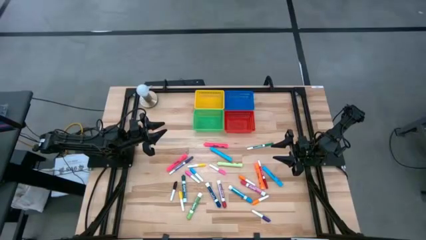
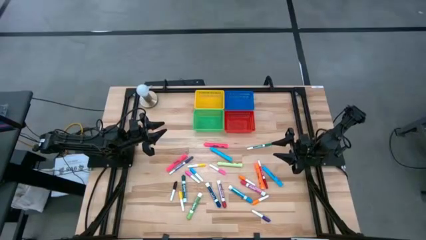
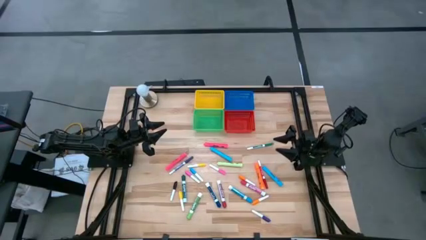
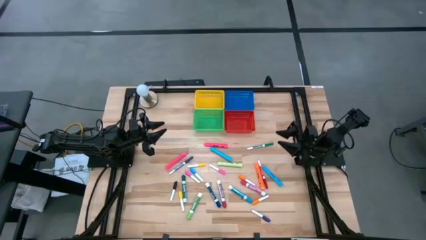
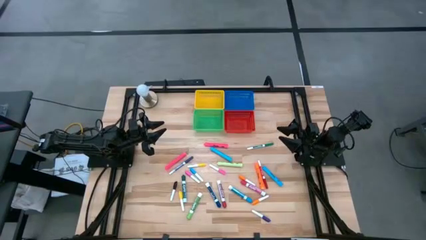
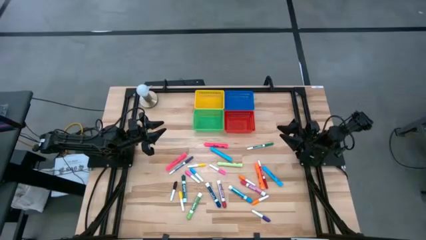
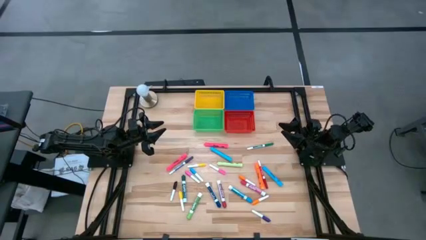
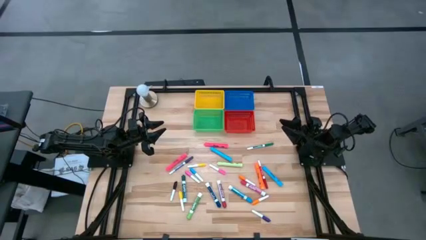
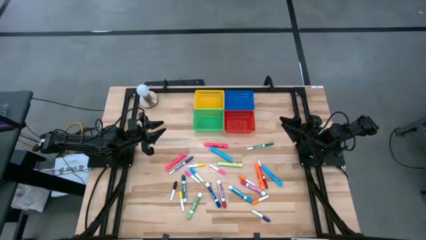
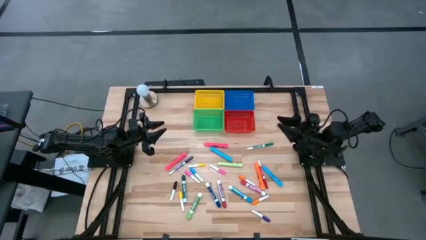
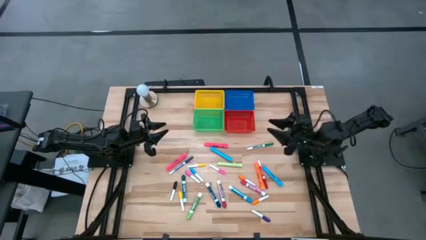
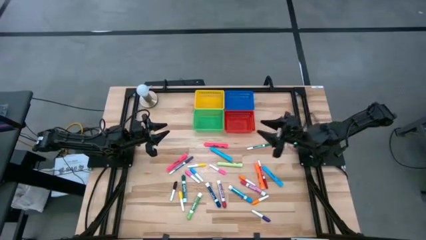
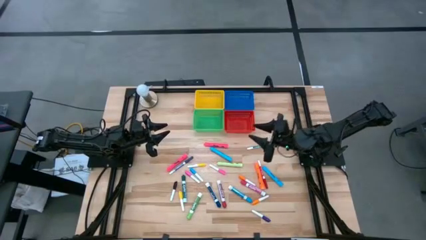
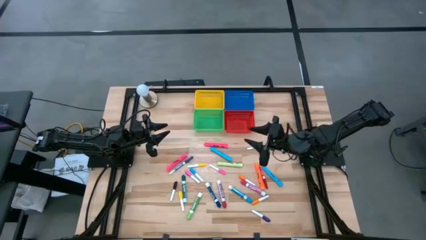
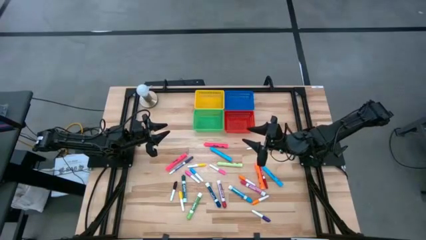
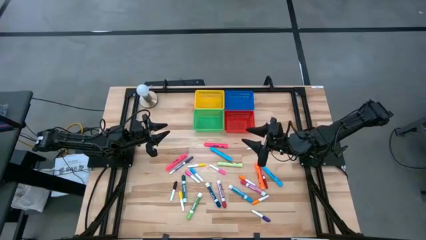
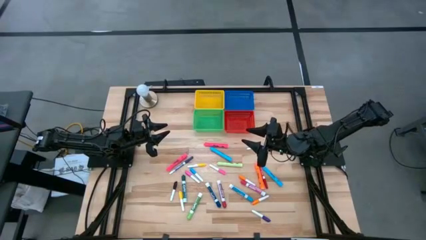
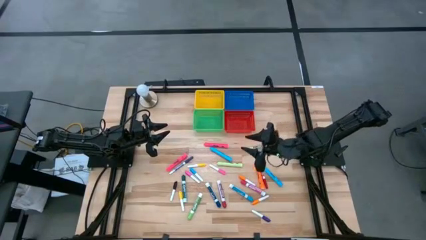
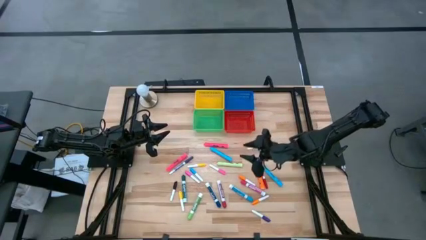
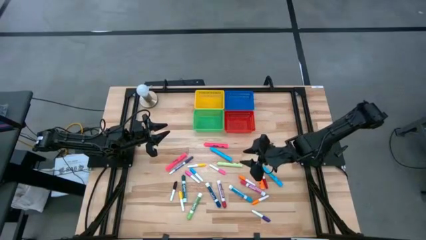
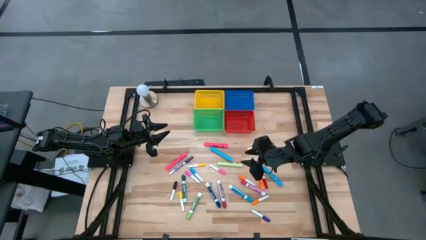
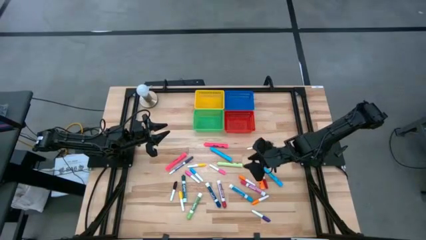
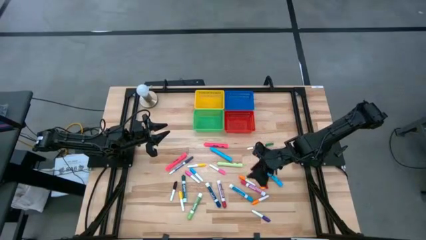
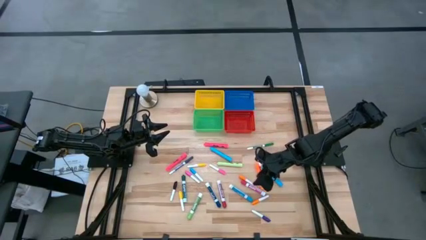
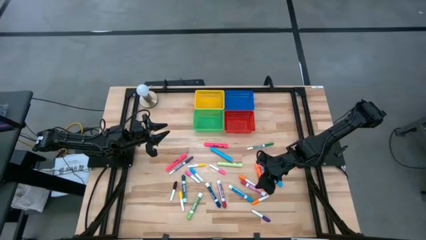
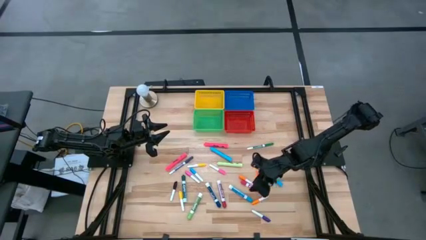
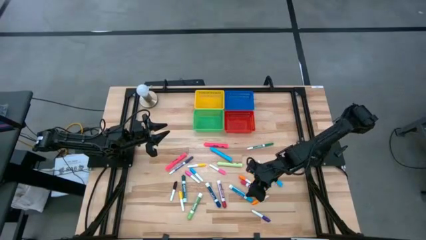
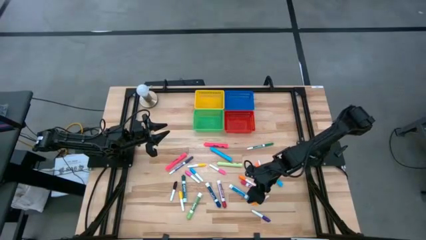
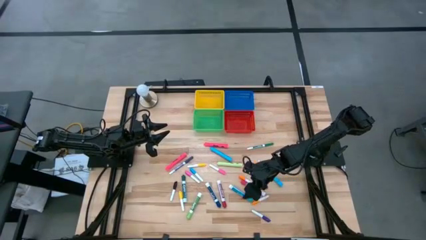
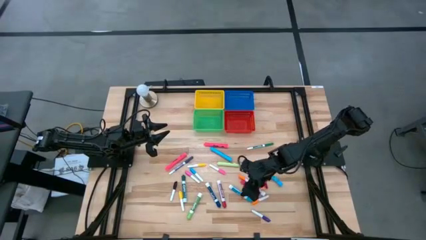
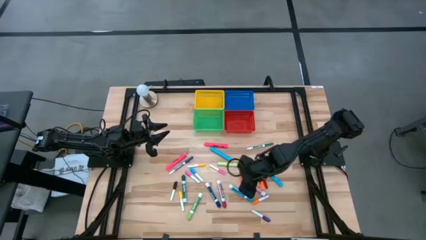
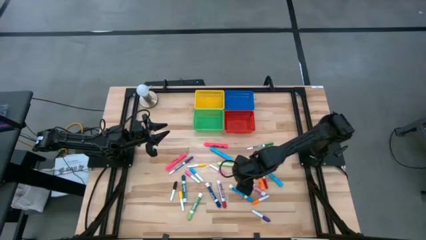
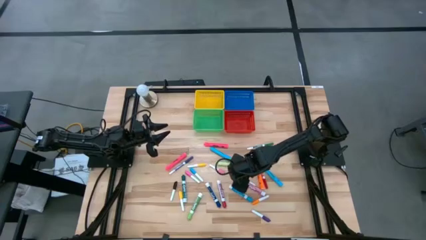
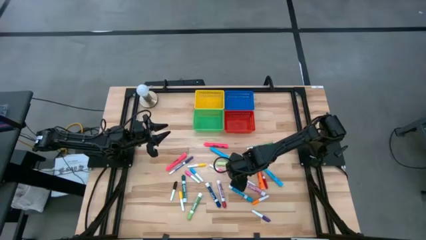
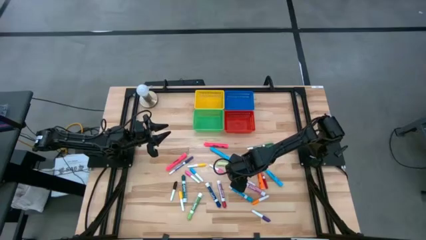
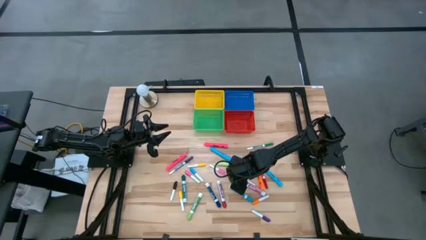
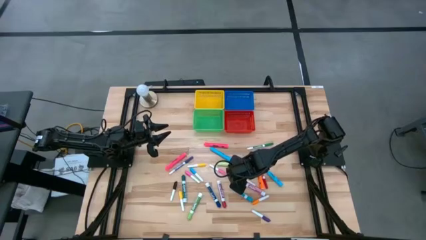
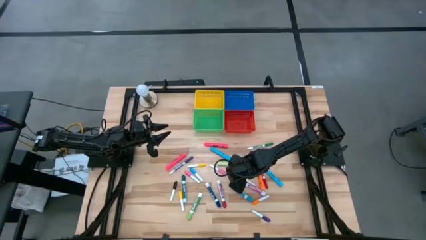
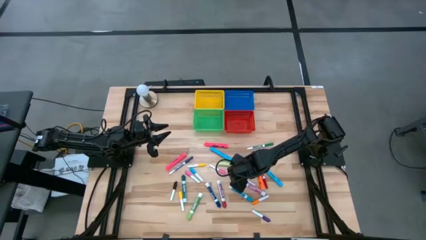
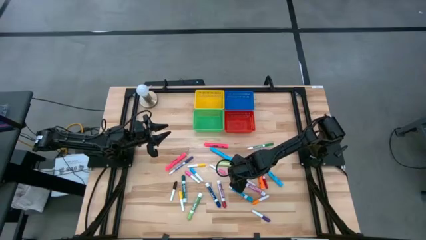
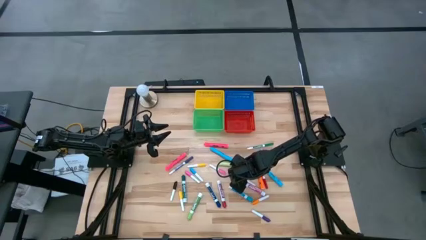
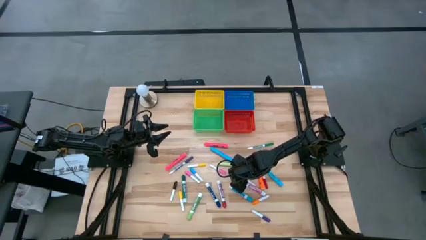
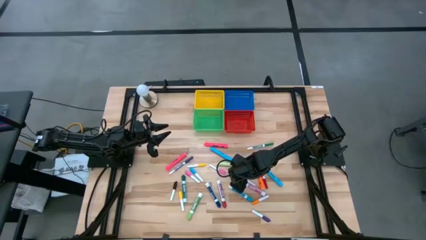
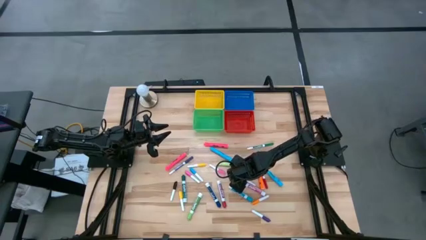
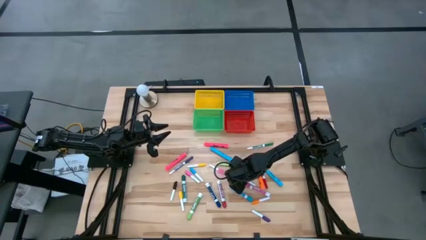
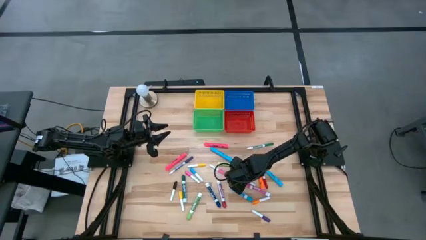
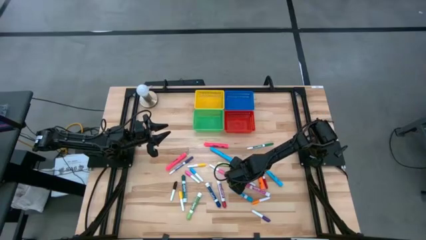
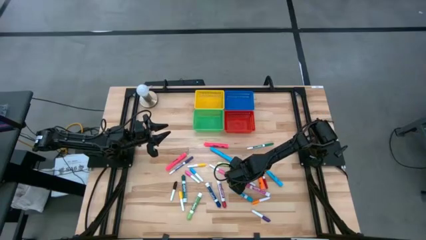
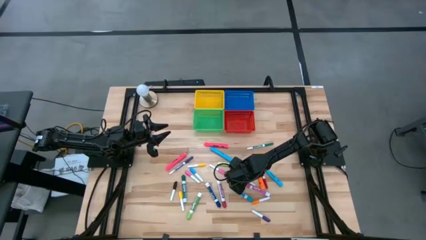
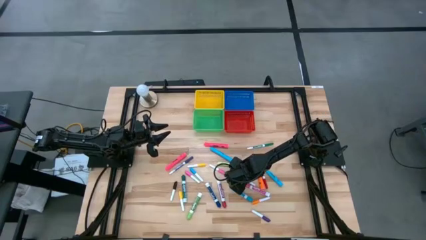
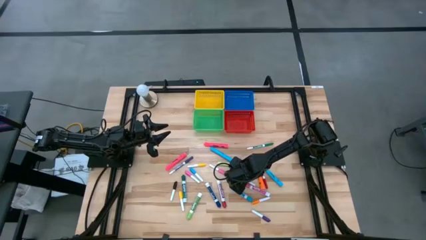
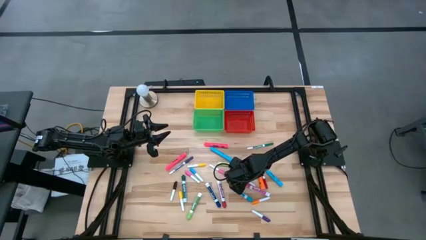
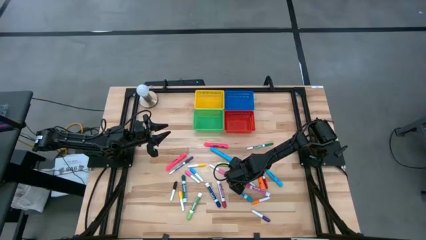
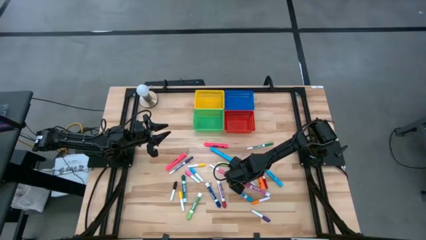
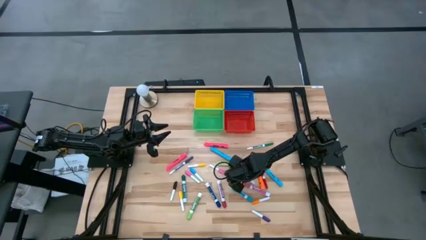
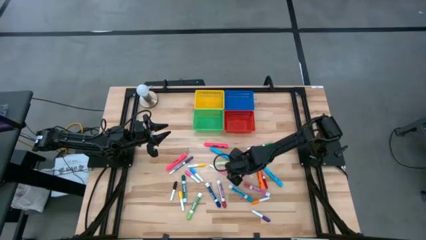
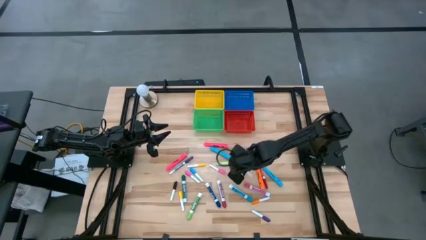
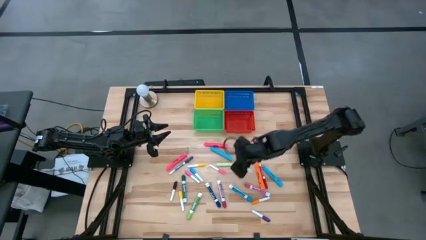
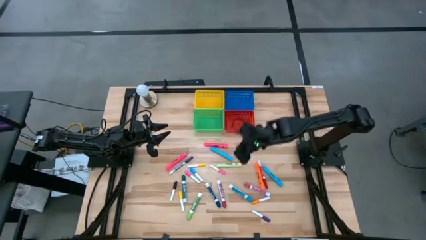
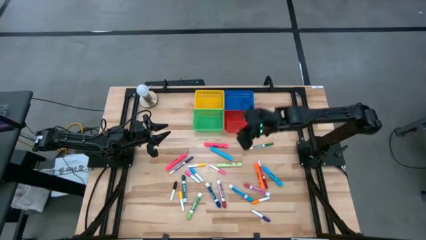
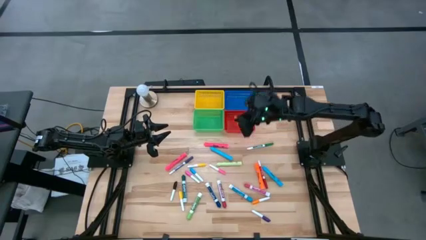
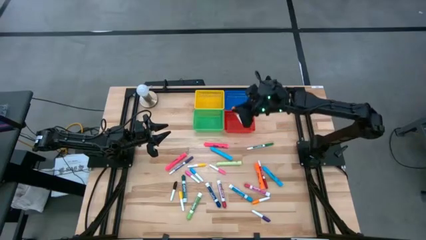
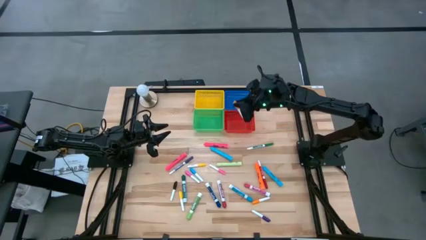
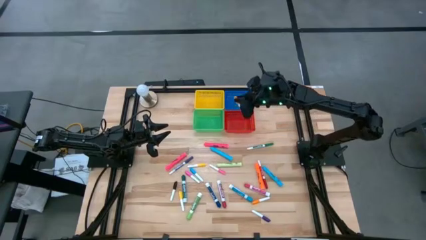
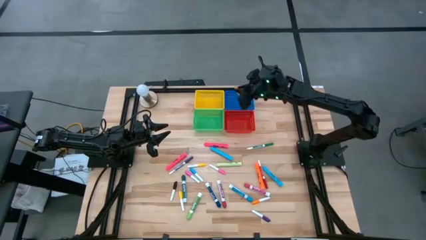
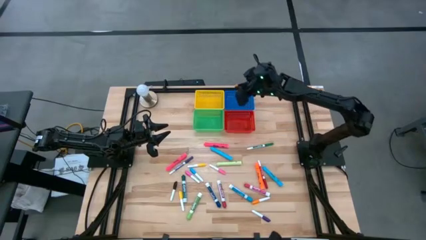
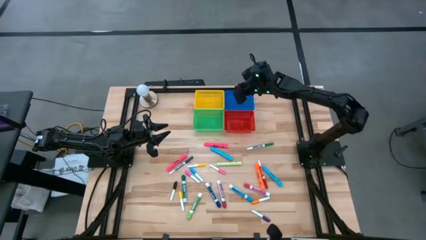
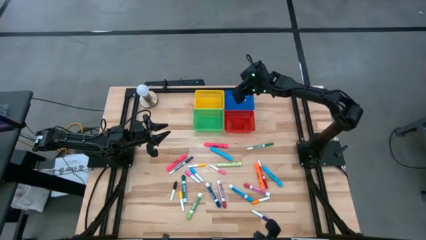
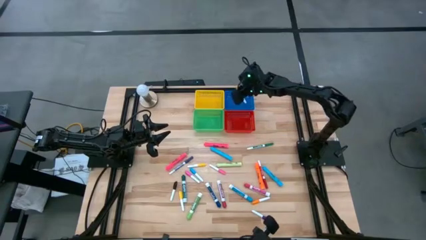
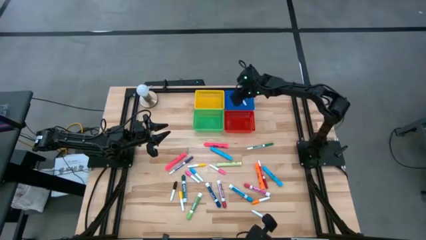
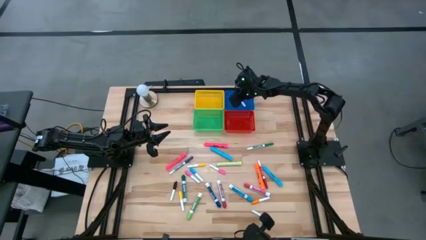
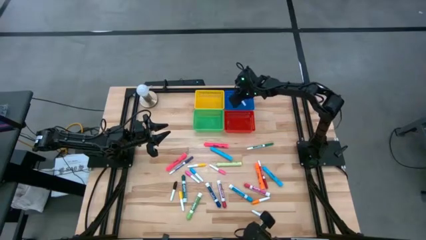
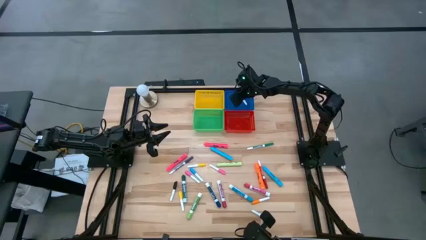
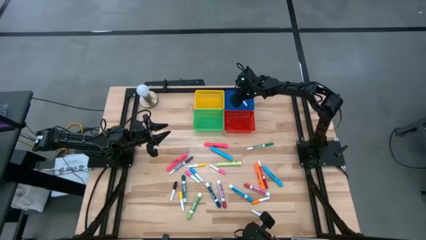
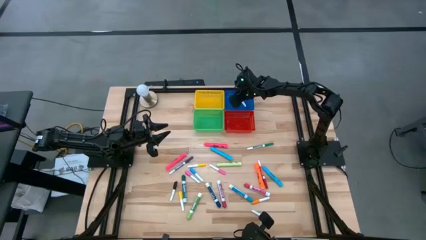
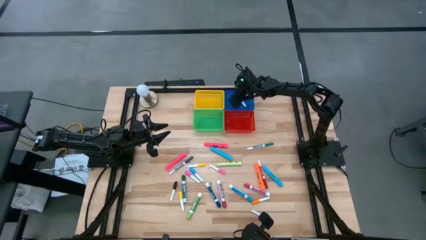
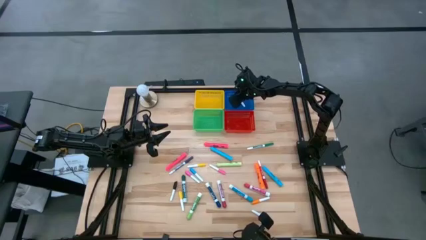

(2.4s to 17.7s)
Task: Pick & Place Markers
Put the top small orange highlighter pen into the blue bin
